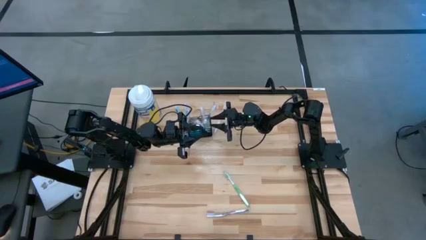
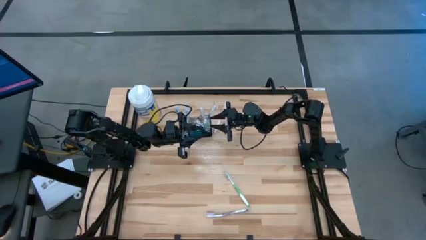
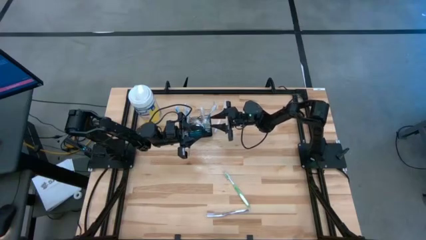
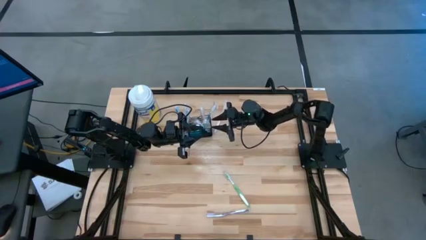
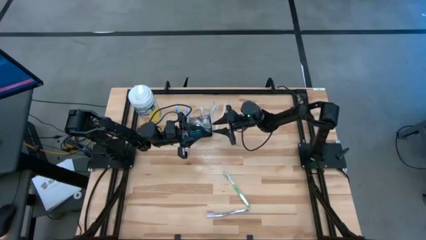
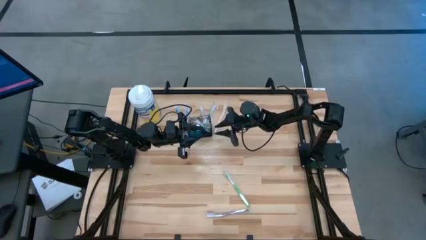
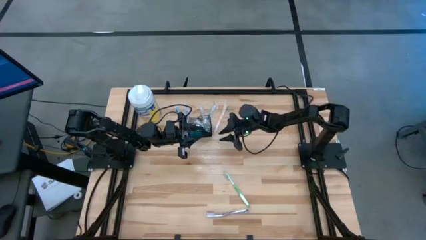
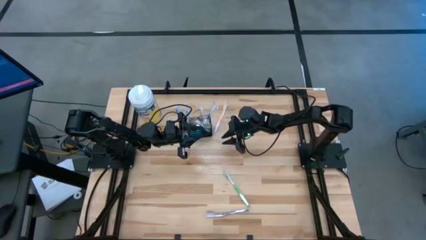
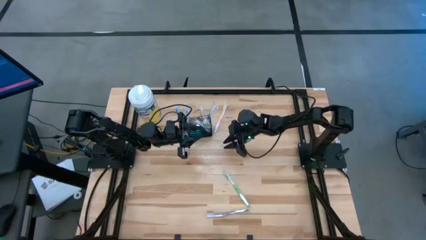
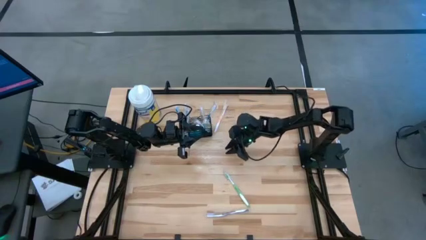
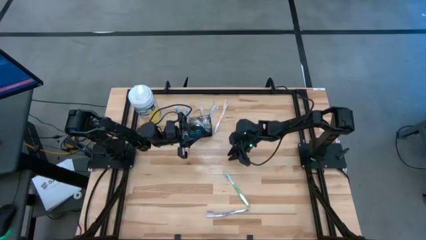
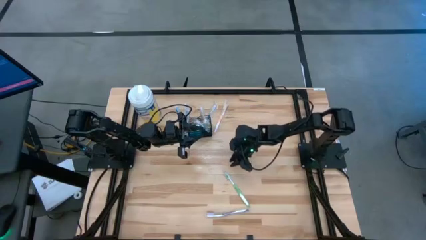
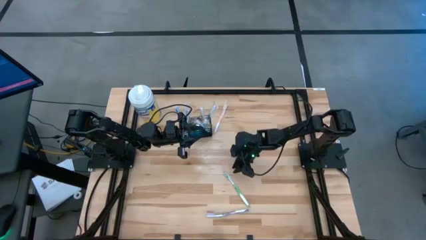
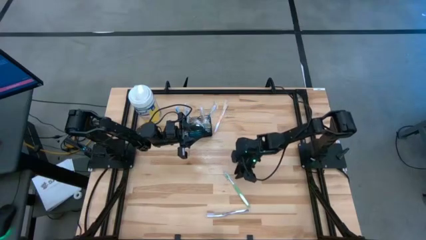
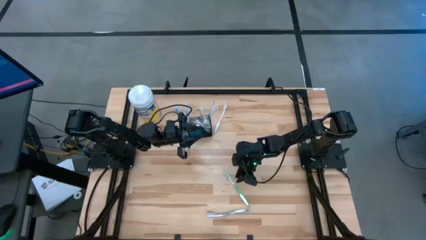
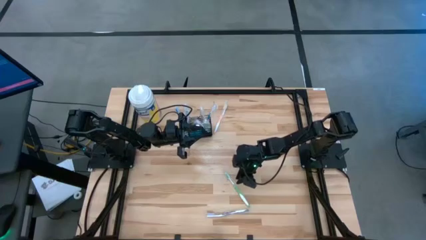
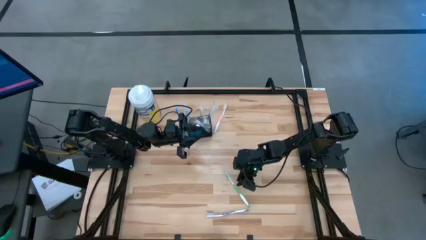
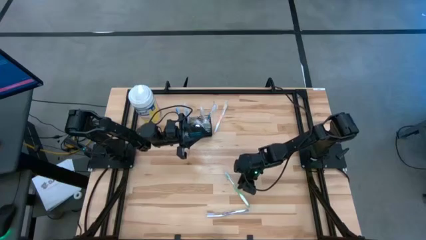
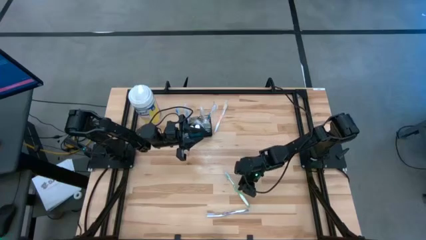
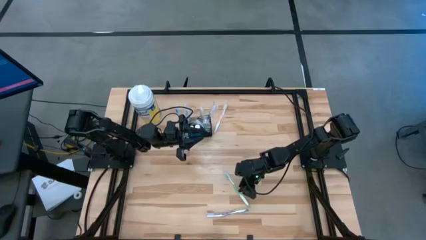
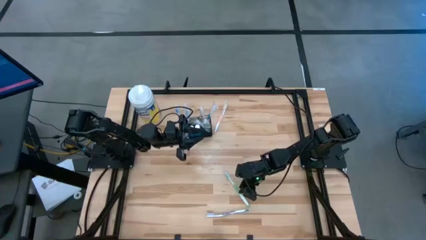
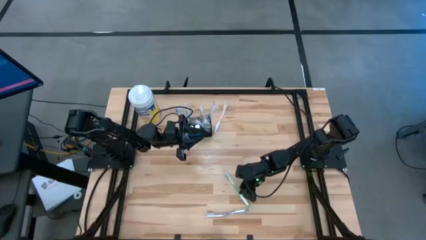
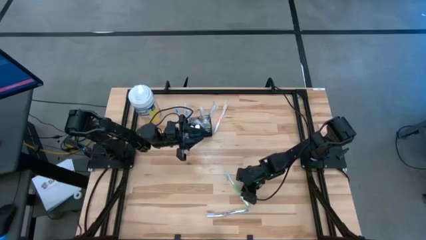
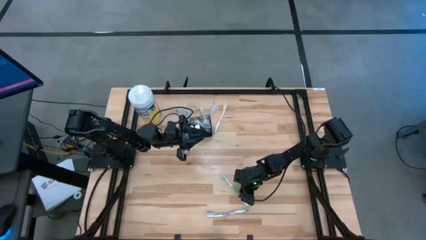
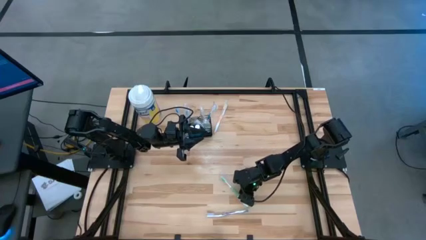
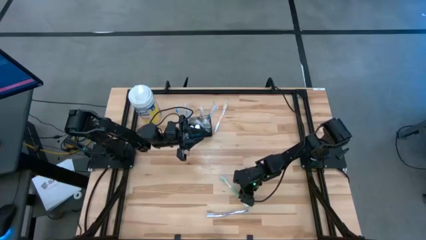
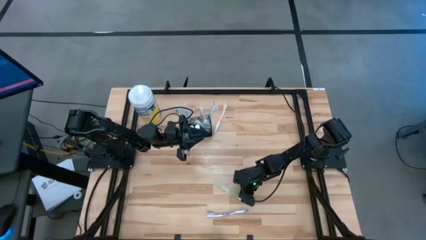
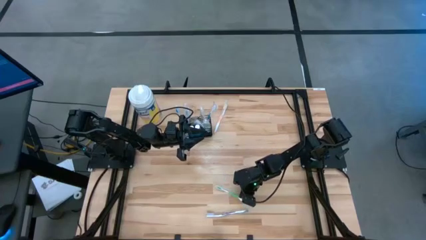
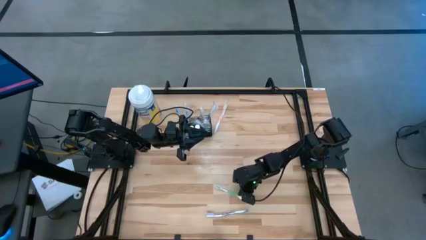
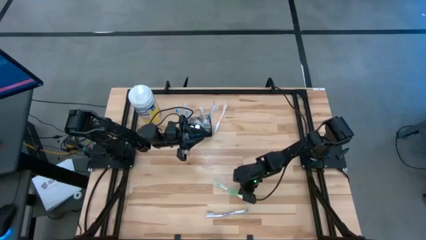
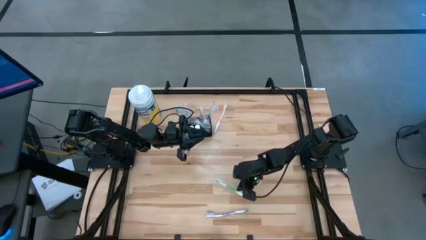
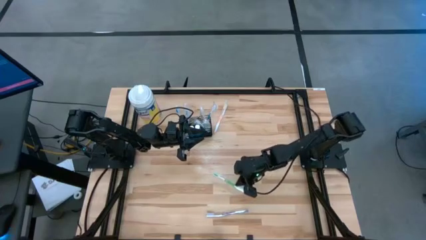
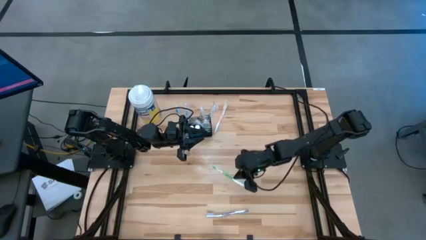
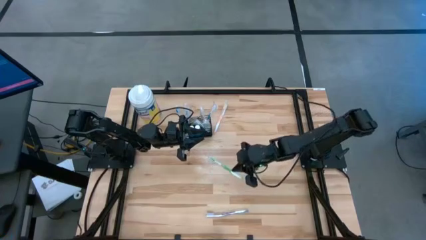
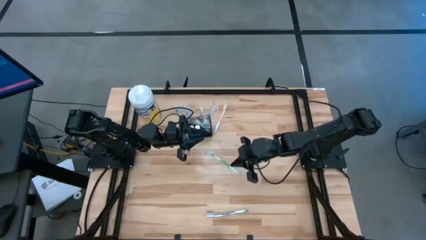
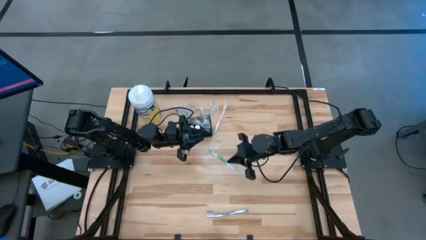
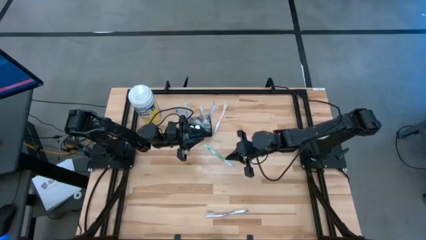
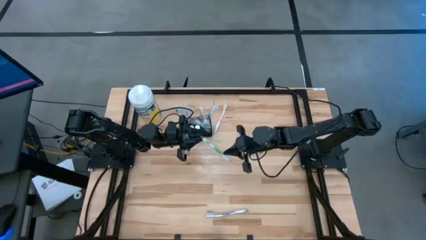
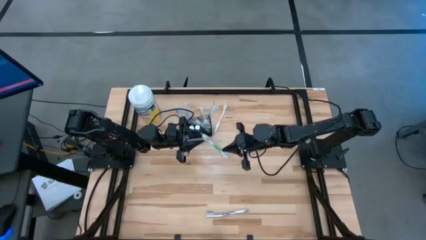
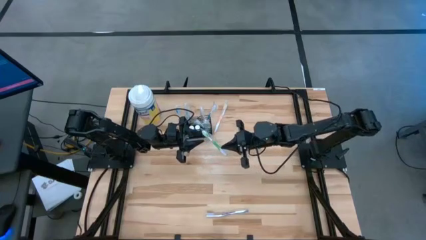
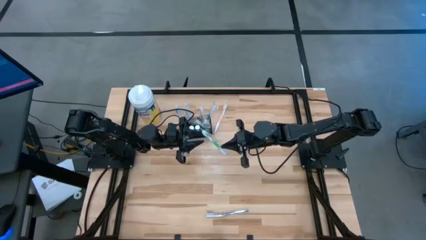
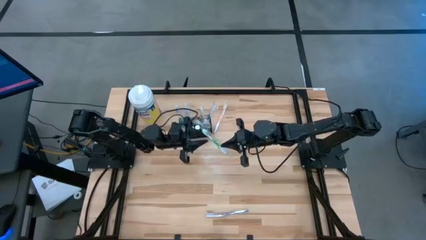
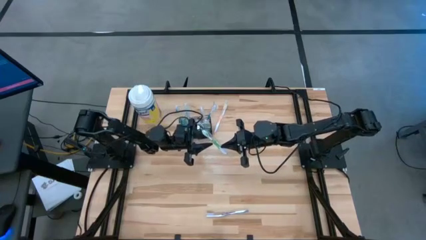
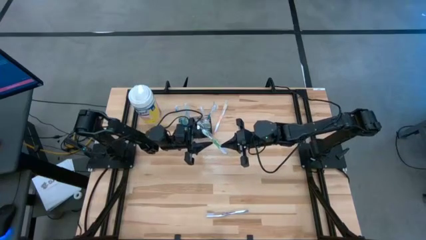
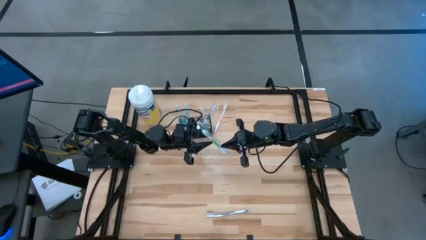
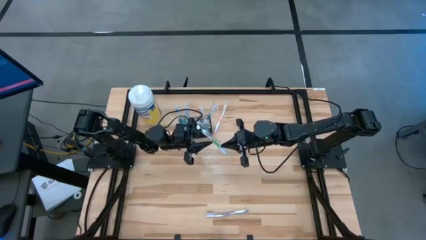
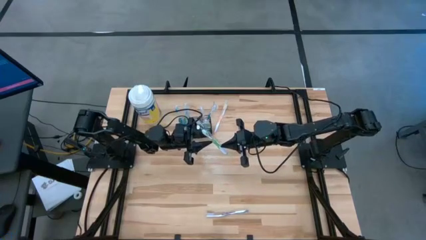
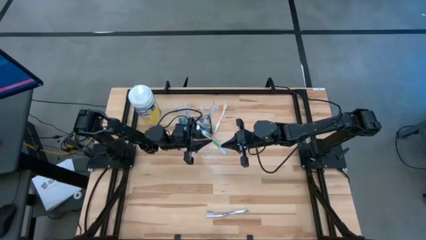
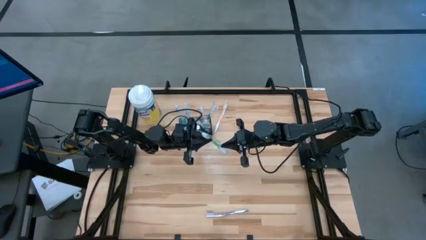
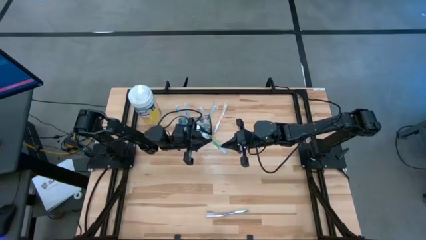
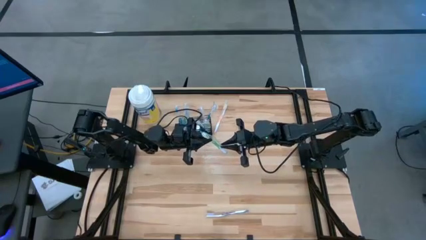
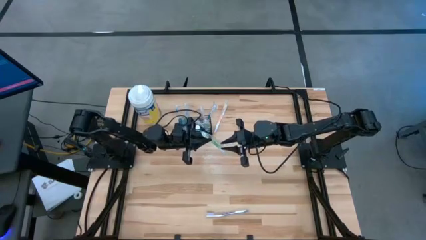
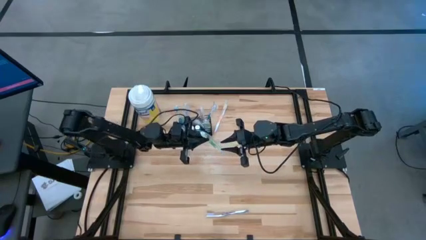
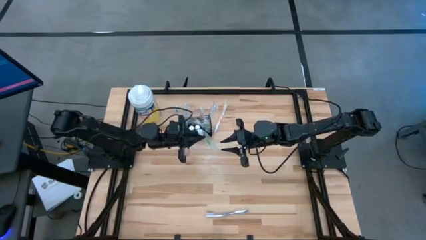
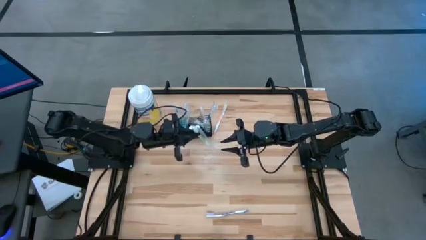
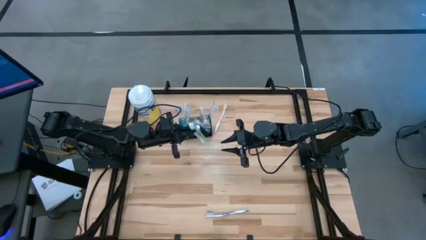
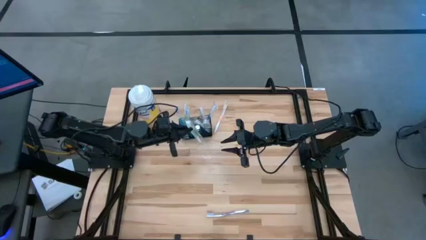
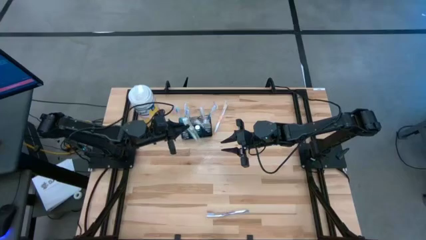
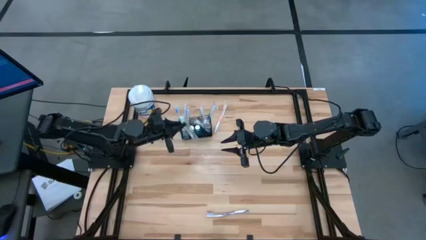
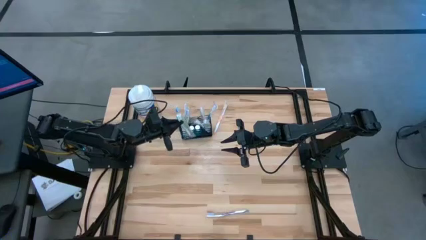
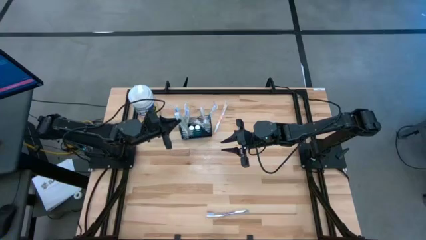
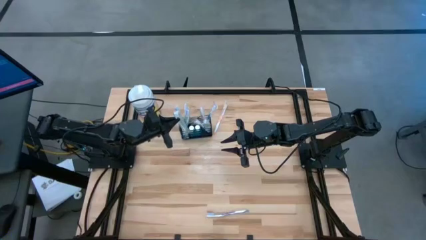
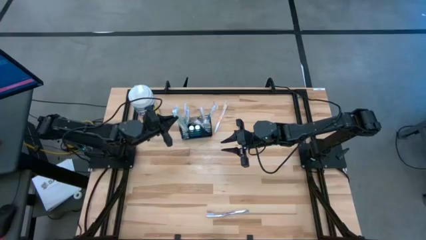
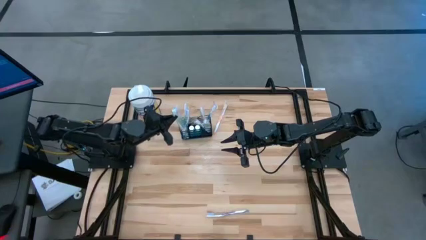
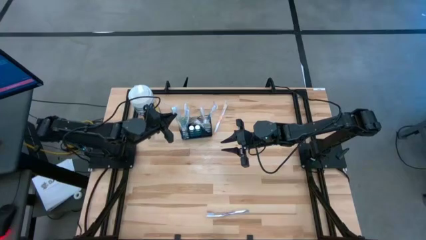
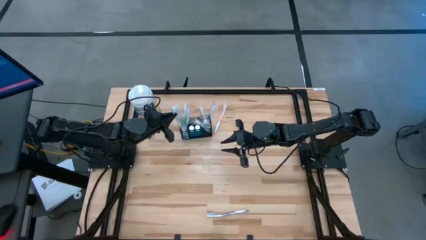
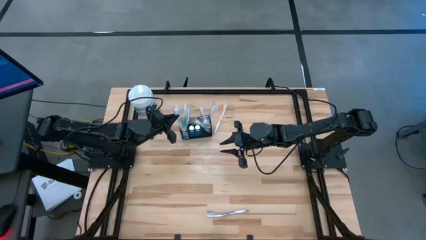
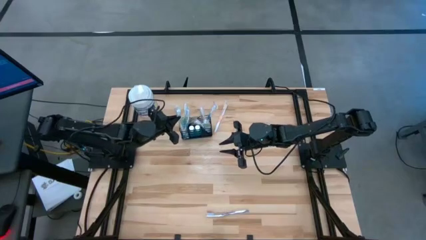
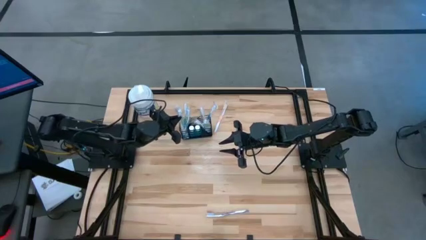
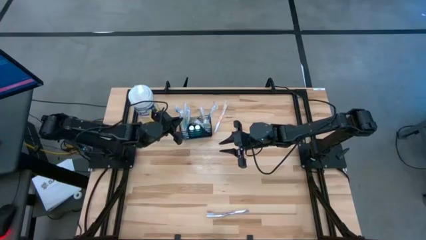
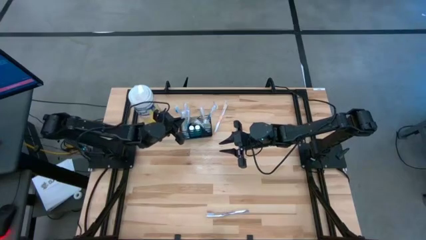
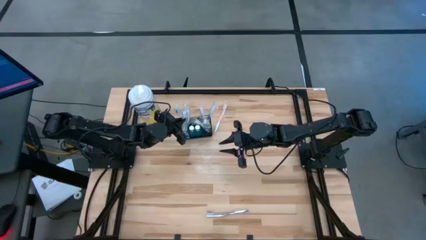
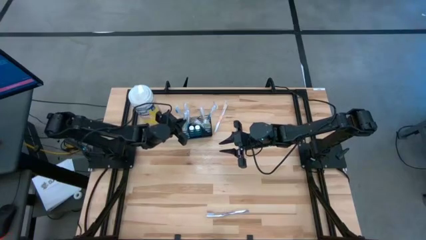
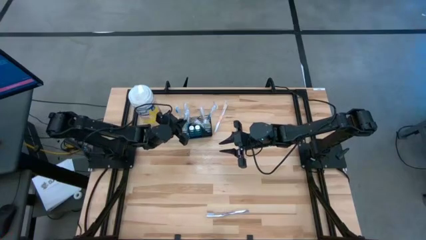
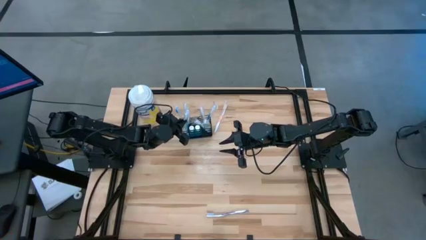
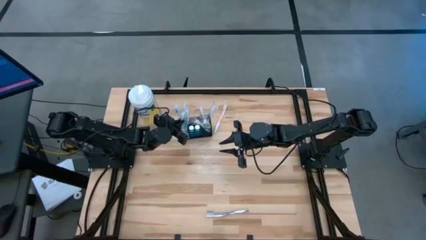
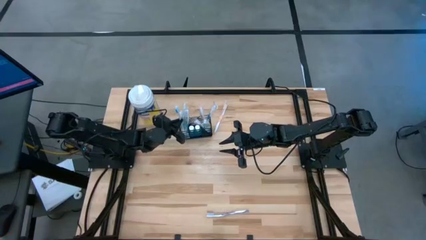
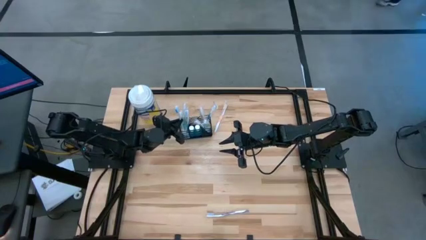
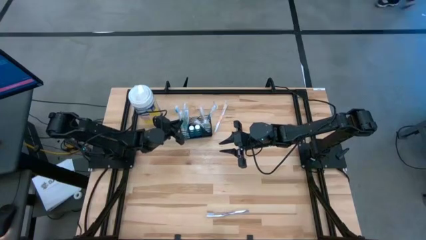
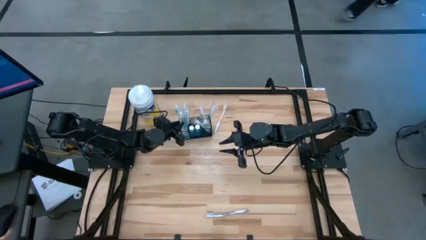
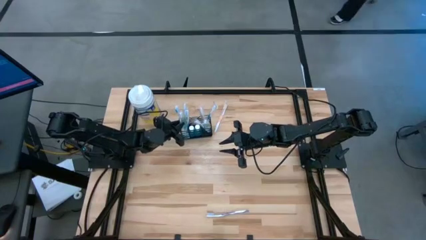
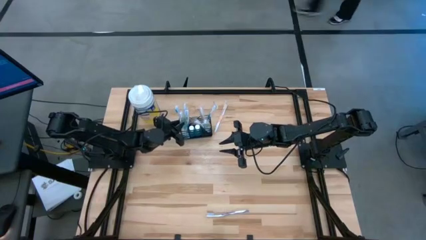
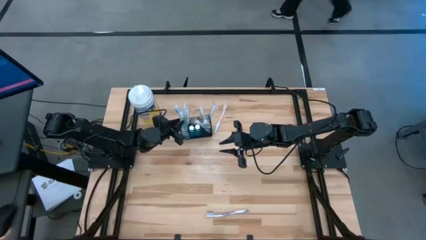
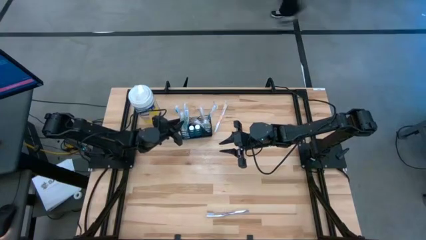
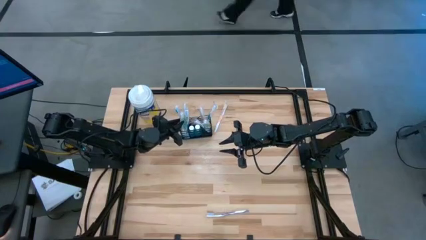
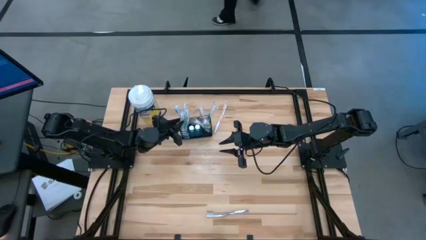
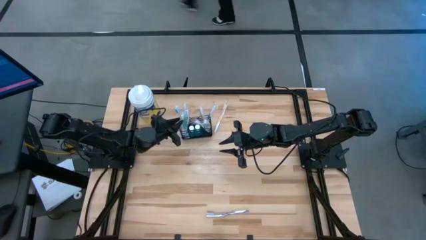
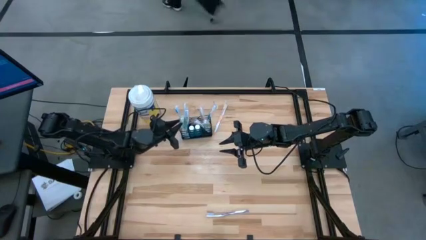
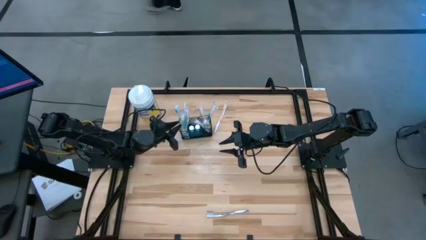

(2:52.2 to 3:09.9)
Task: Pick & Place toothbrushing station
Put the green toothbrush into the mesh organizer
